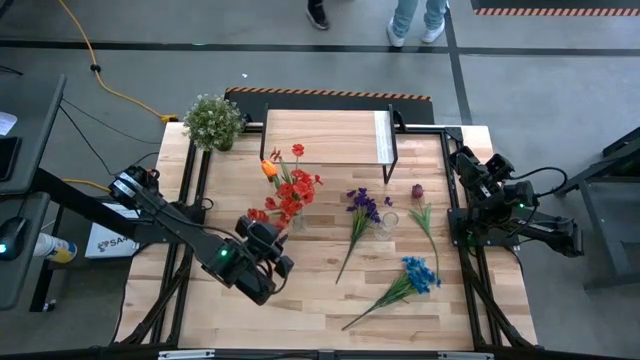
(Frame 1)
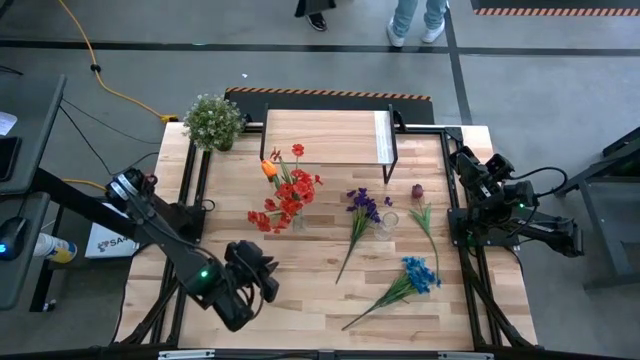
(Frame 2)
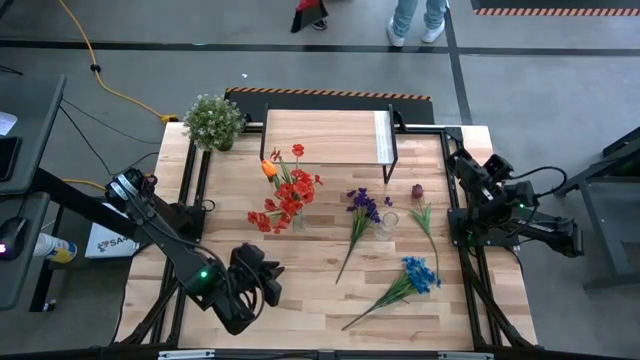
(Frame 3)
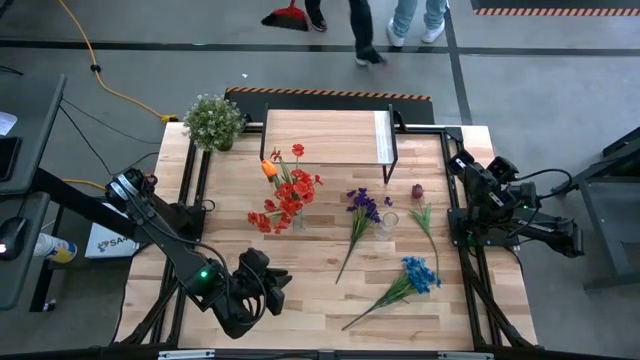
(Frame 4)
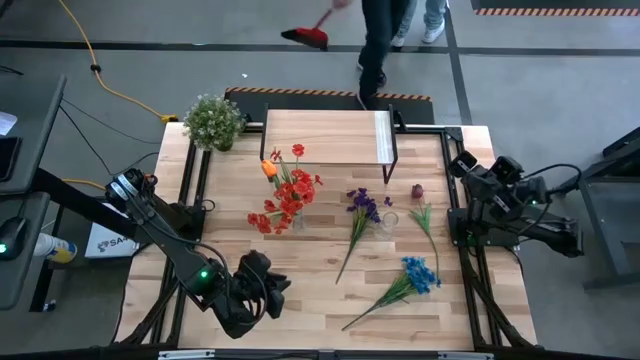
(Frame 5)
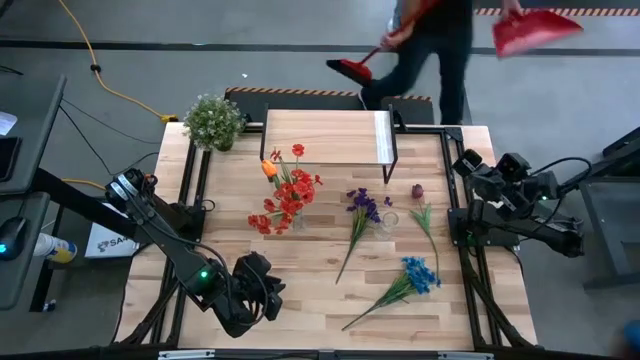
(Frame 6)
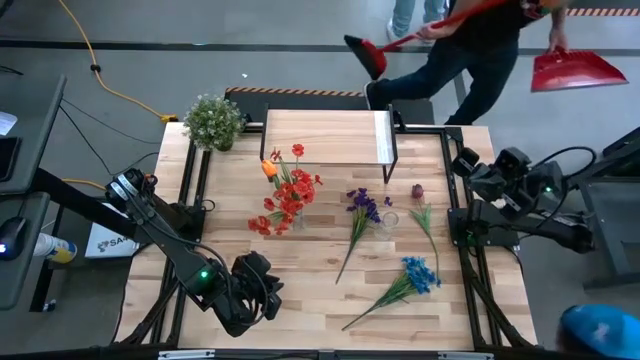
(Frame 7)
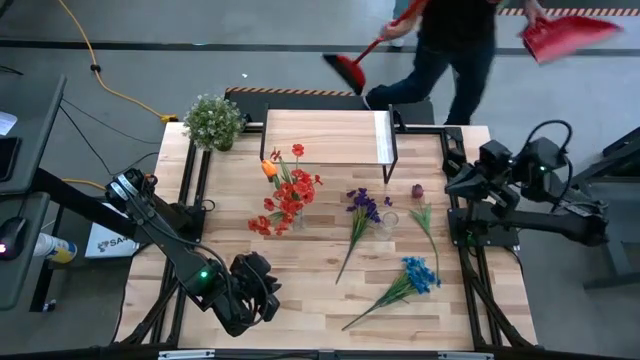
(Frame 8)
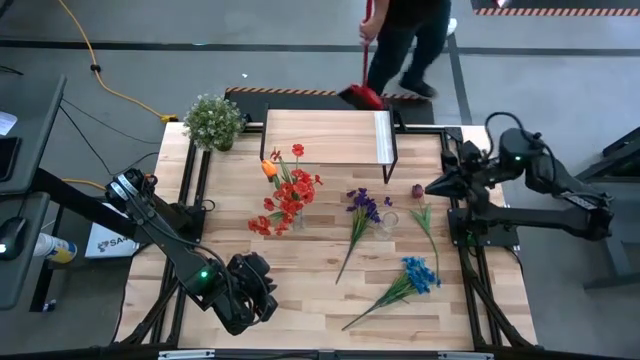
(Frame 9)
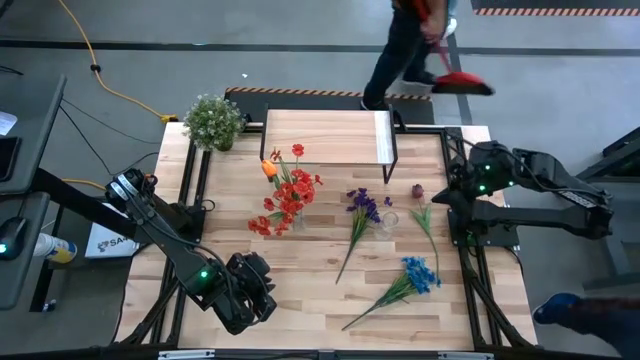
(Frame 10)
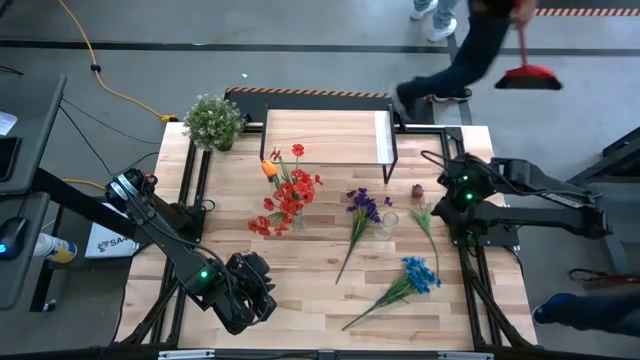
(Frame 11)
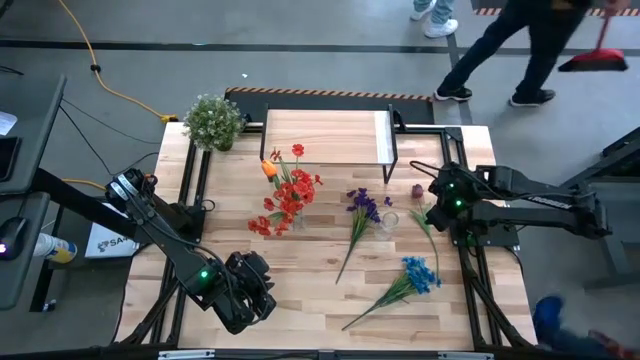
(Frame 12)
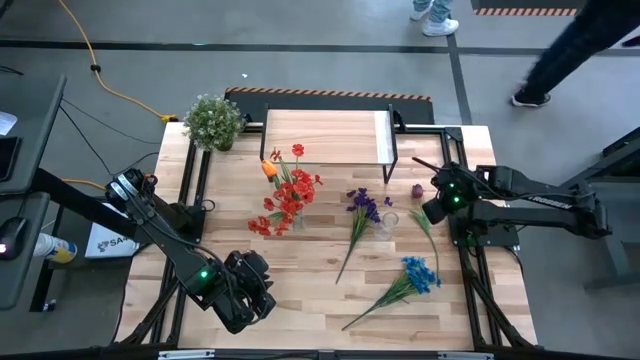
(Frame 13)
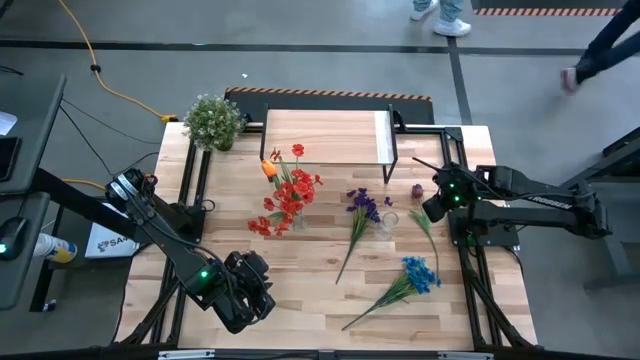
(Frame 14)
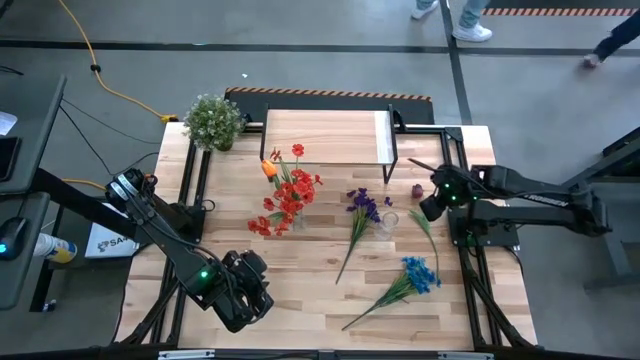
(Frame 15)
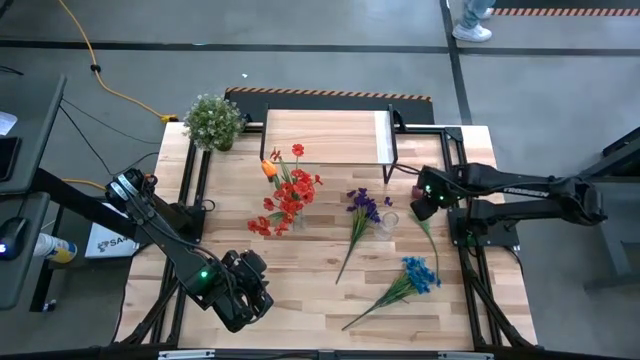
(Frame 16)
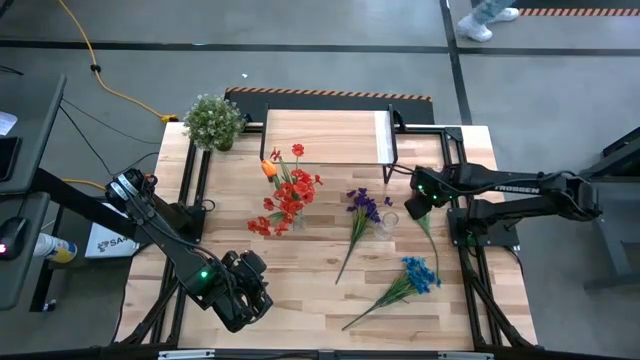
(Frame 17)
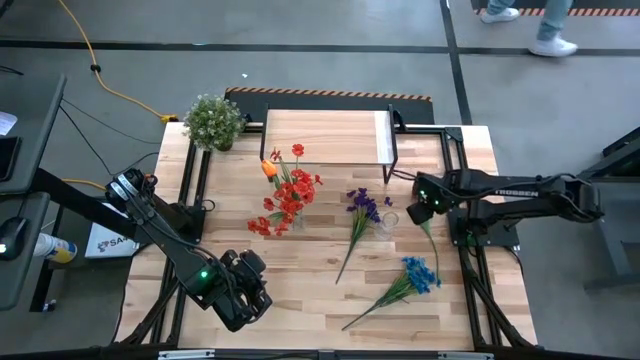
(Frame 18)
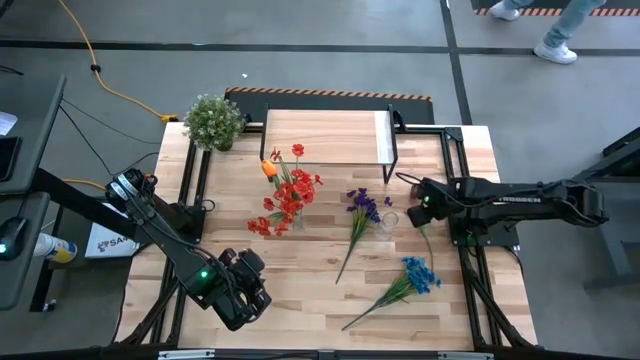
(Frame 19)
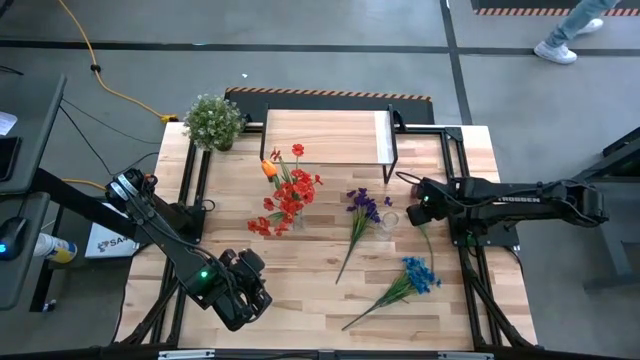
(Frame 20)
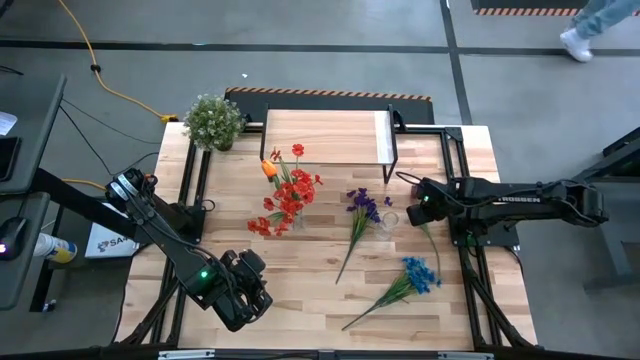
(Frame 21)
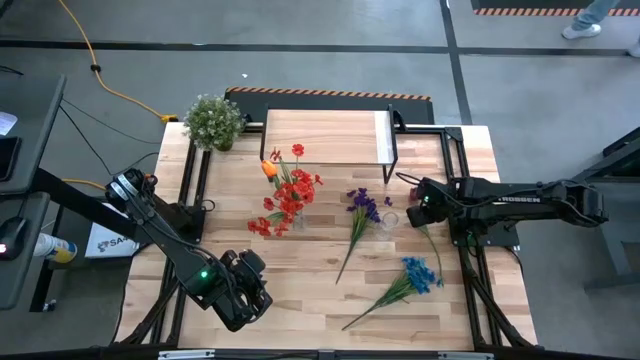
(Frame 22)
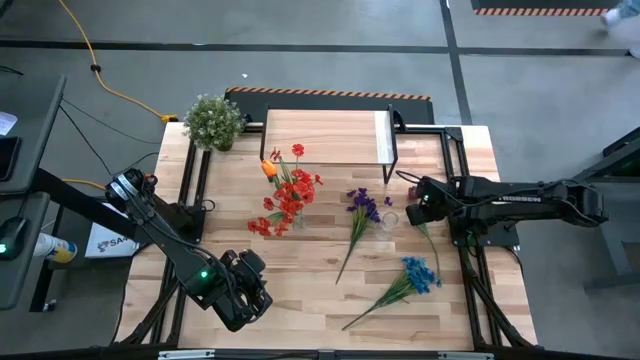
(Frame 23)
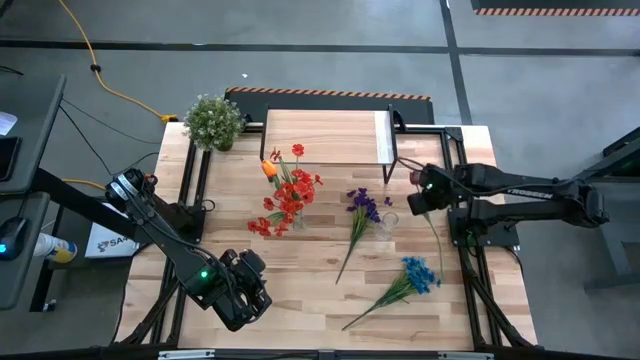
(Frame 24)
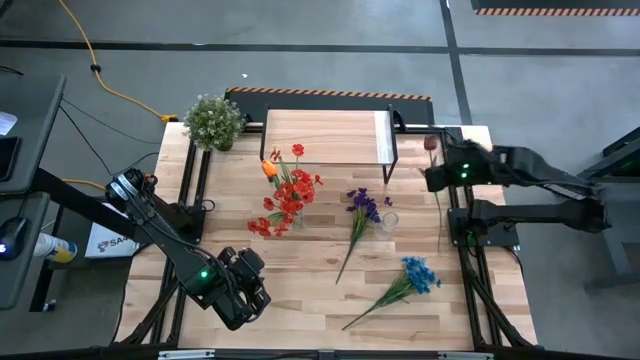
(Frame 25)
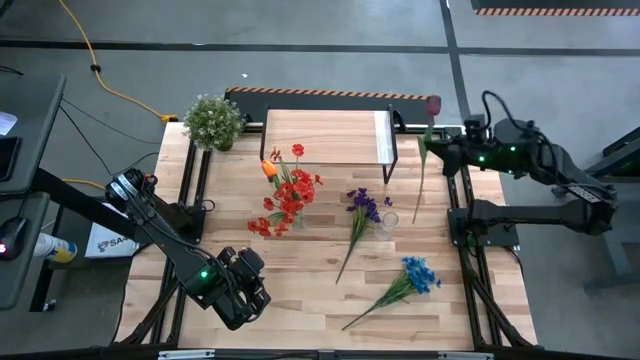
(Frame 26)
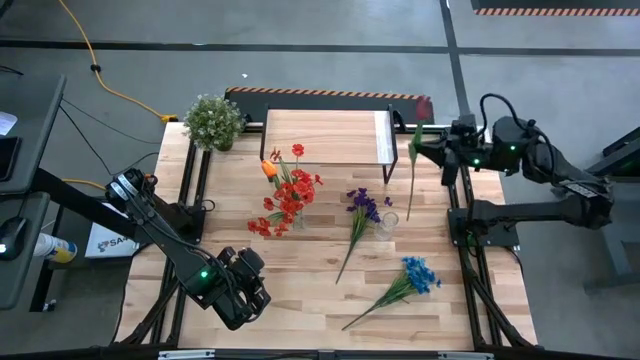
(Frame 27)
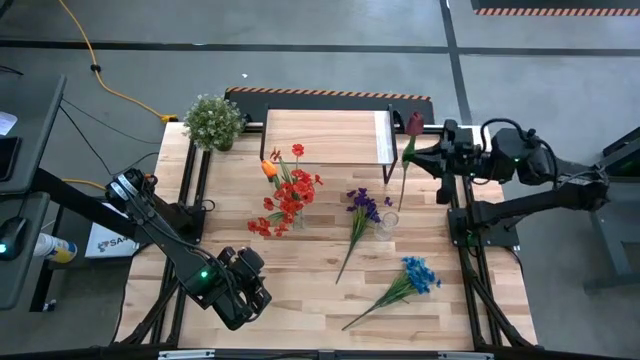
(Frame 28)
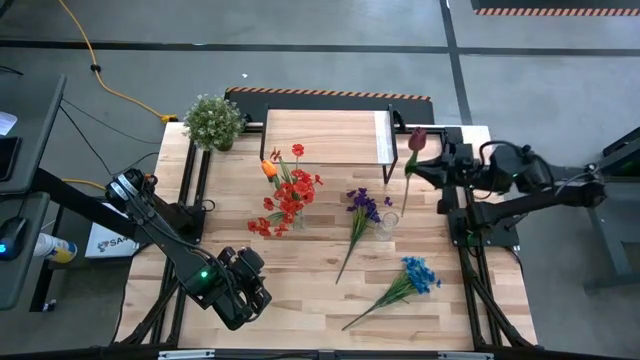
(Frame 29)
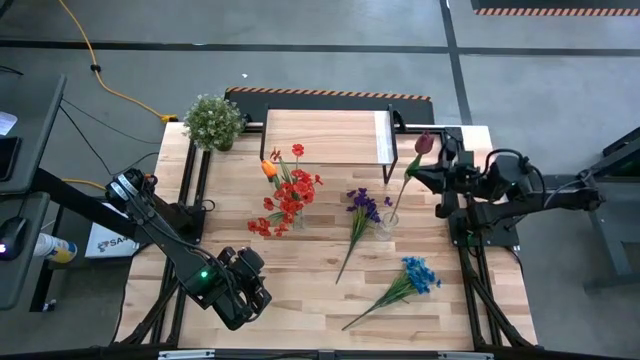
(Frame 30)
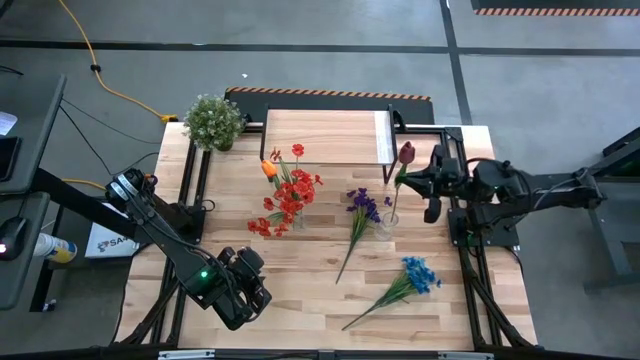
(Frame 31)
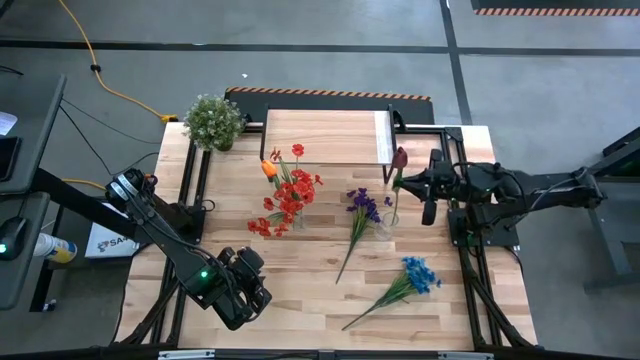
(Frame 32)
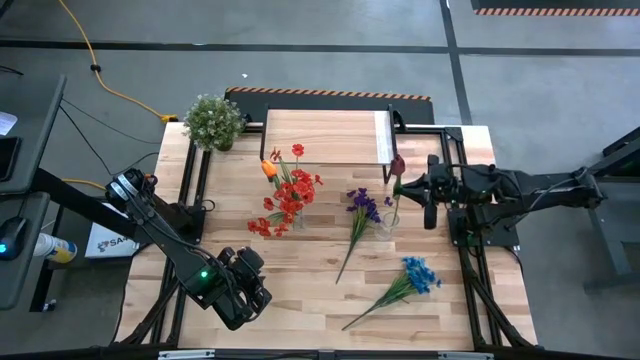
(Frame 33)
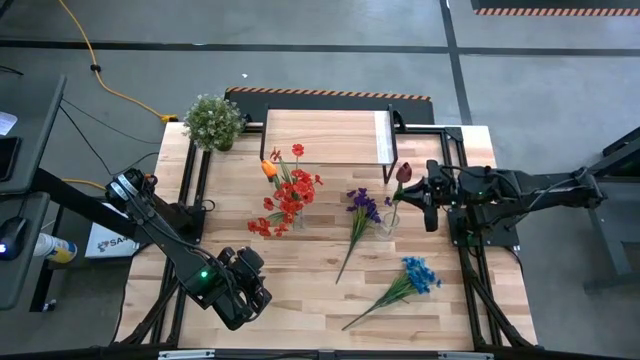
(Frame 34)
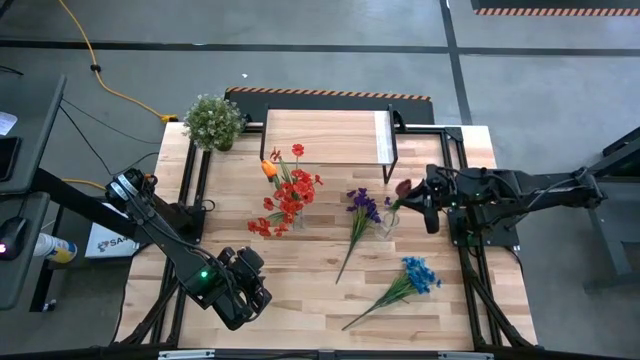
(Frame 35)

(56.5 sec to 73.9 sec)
Task: Pick and place flowers into a vace then onto a shelf
Put the red tulip into the right transparent vase

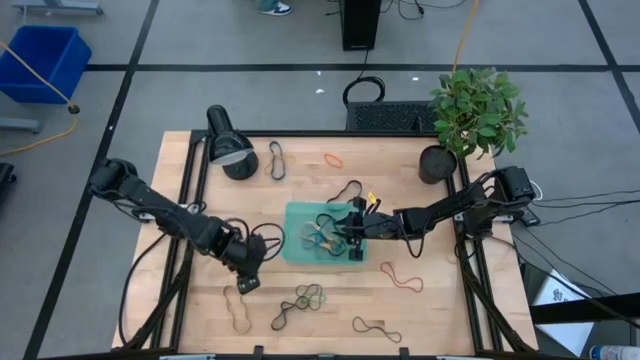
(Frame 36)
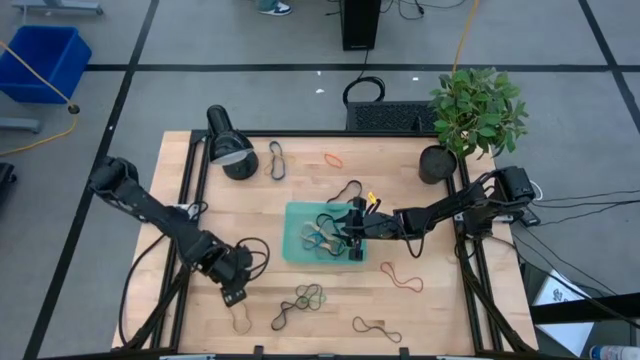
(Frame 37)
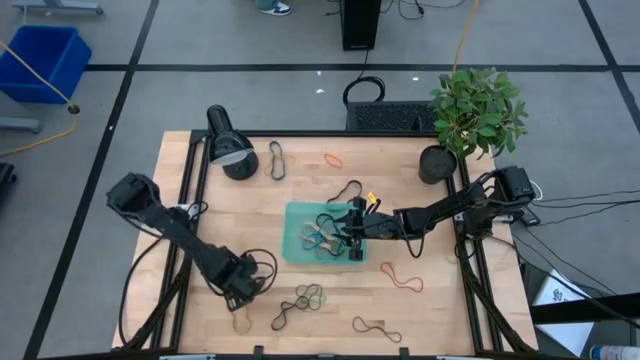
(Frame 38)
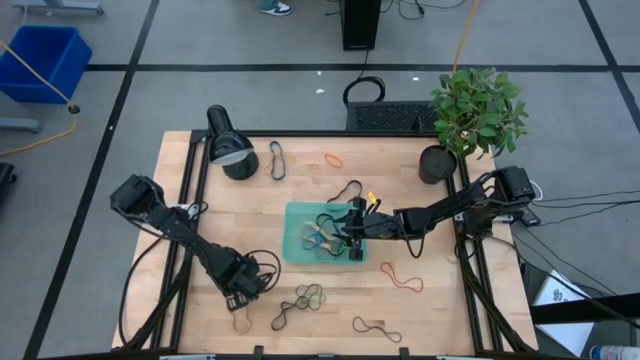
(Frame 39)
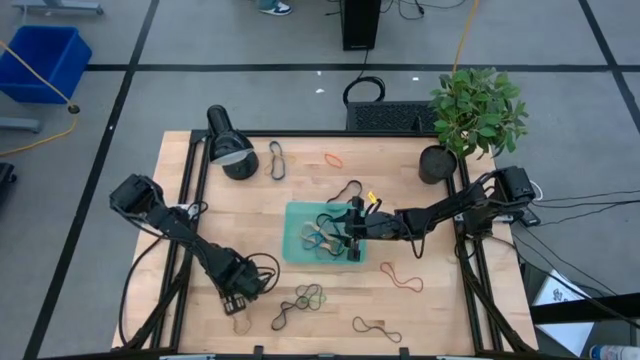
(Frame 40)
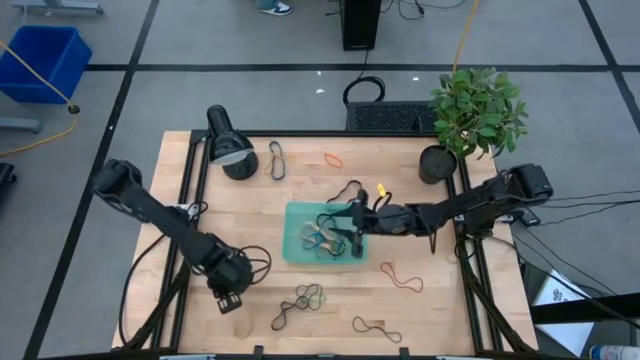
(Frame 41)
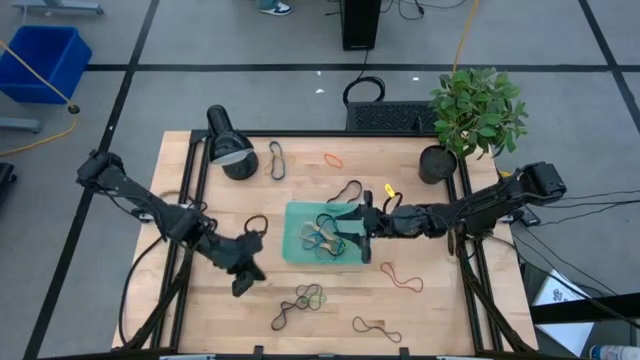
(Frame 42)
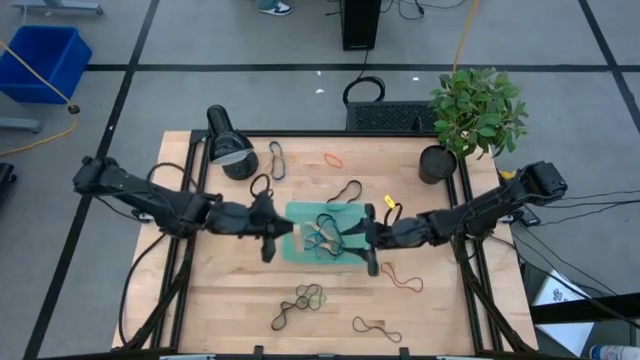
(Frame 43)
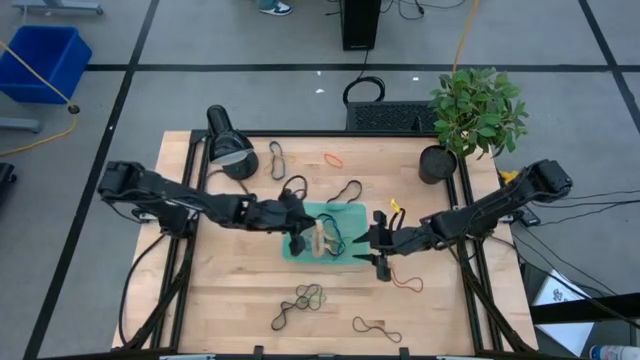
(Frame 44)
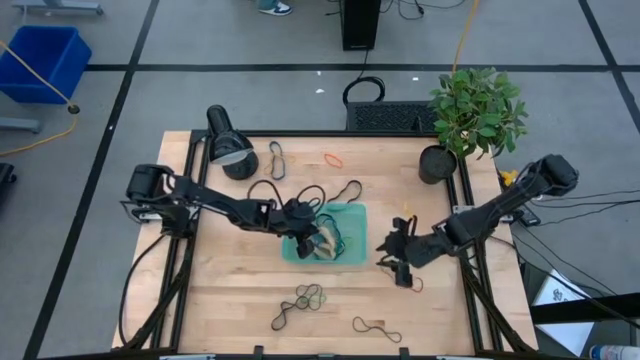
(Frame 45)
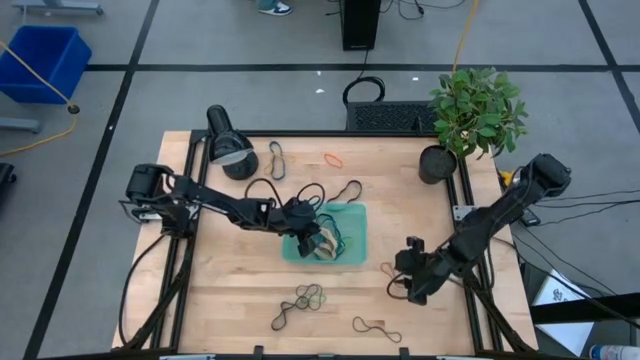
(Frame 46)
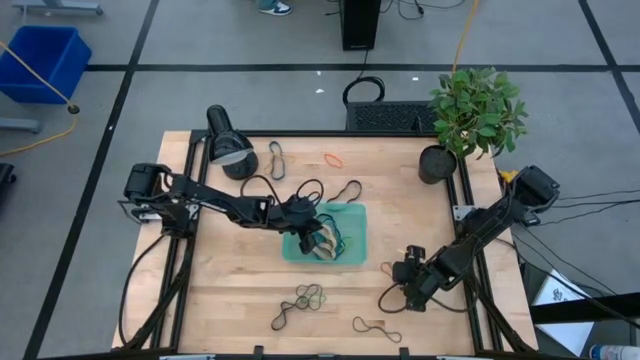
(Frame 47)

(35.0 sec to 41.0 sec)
Task: Pick and place rubber bands into bin
Put the brown rubber band into the green bin
